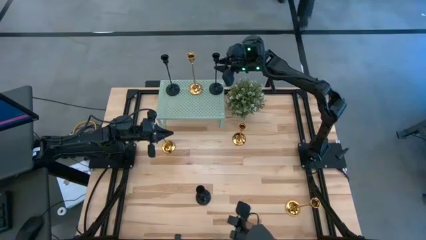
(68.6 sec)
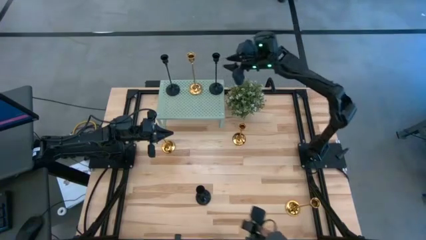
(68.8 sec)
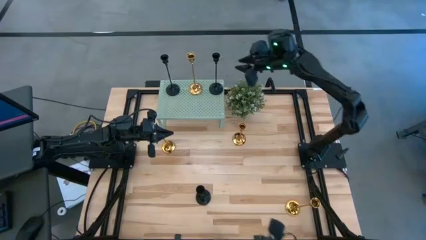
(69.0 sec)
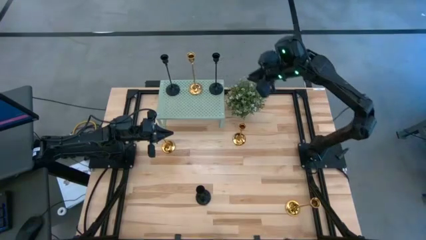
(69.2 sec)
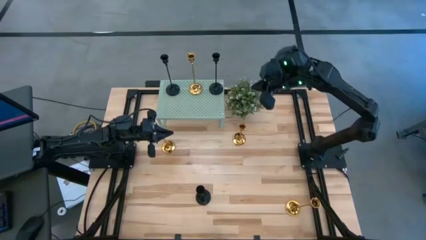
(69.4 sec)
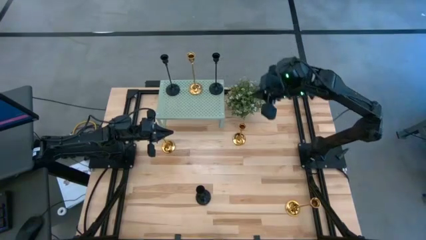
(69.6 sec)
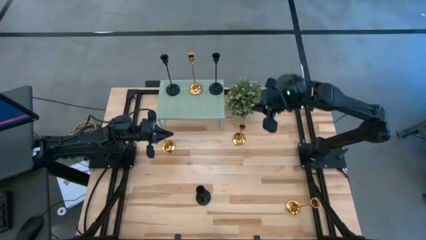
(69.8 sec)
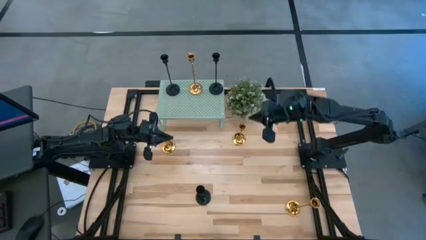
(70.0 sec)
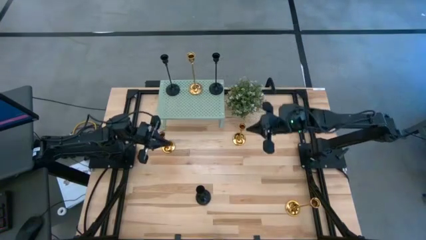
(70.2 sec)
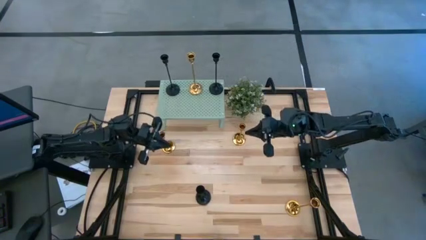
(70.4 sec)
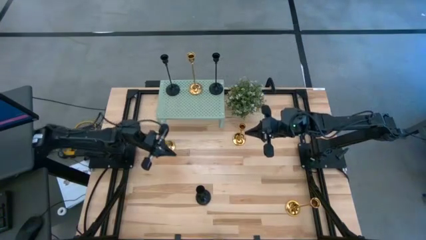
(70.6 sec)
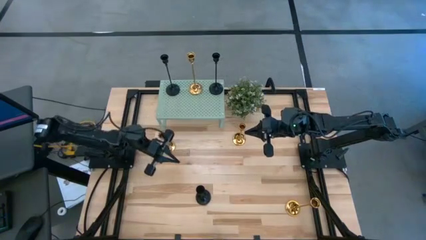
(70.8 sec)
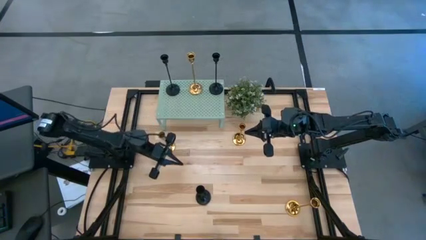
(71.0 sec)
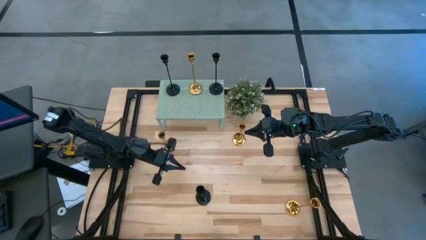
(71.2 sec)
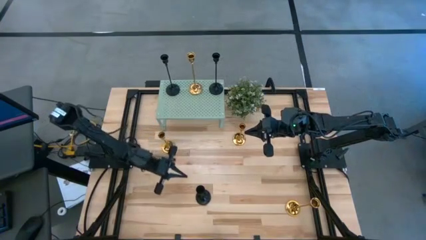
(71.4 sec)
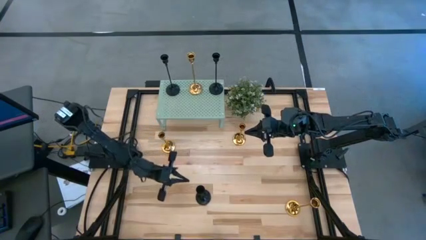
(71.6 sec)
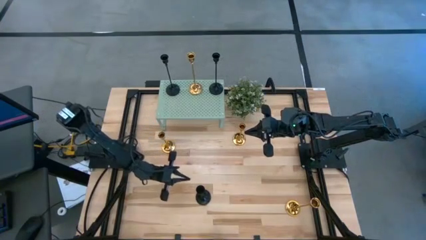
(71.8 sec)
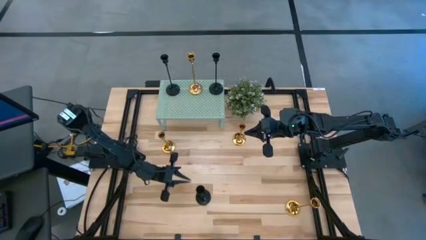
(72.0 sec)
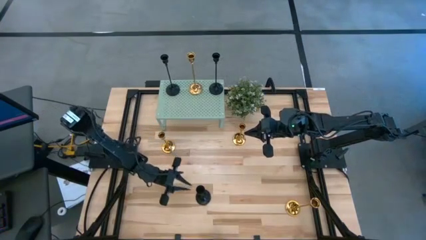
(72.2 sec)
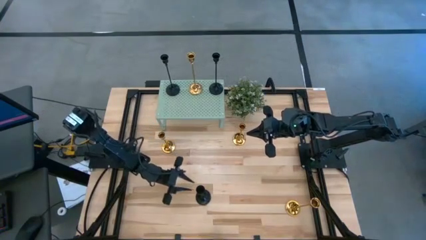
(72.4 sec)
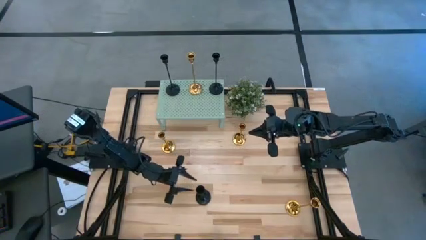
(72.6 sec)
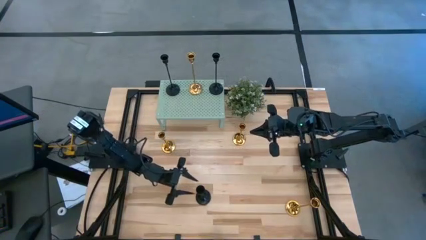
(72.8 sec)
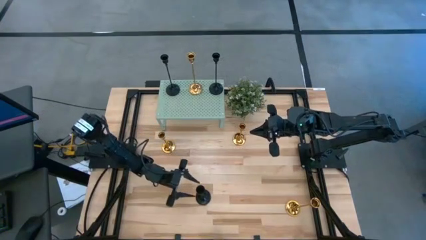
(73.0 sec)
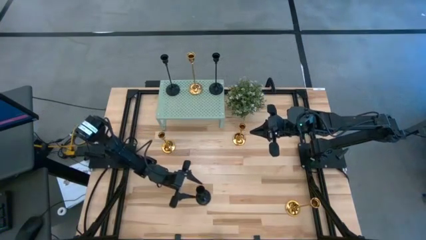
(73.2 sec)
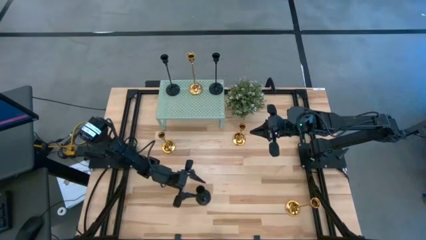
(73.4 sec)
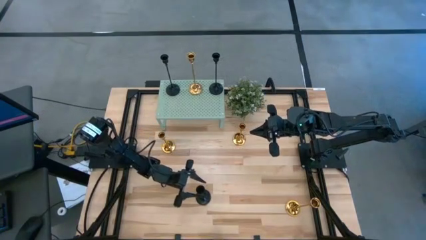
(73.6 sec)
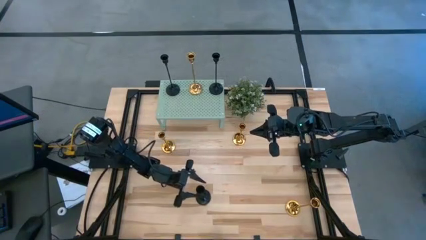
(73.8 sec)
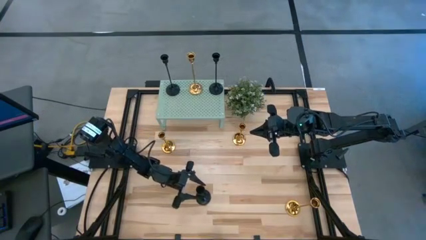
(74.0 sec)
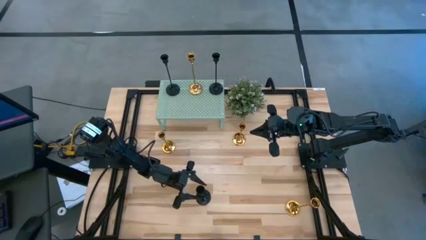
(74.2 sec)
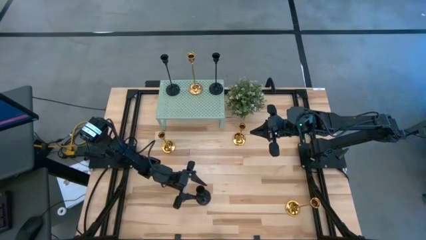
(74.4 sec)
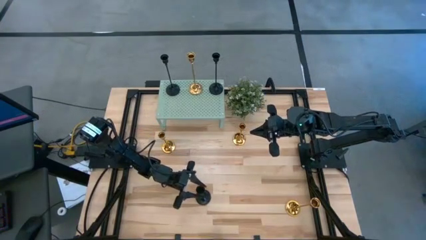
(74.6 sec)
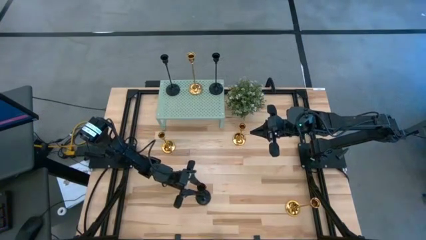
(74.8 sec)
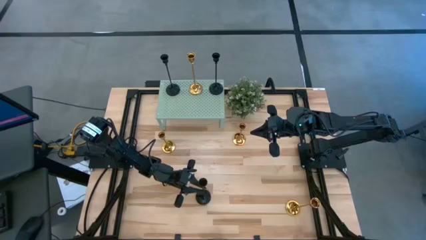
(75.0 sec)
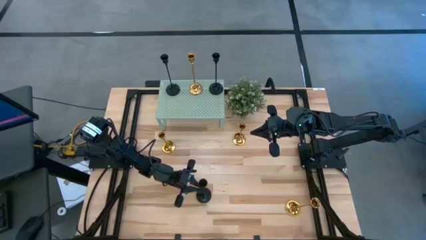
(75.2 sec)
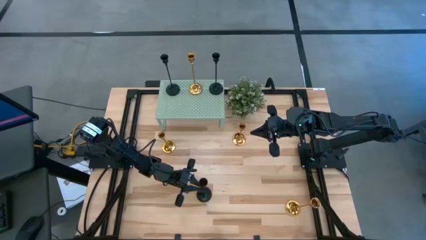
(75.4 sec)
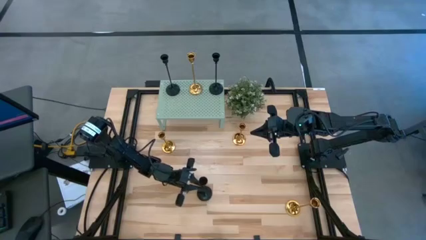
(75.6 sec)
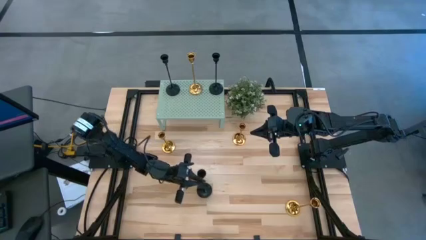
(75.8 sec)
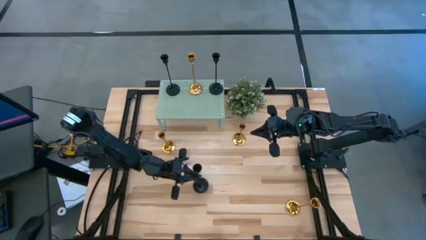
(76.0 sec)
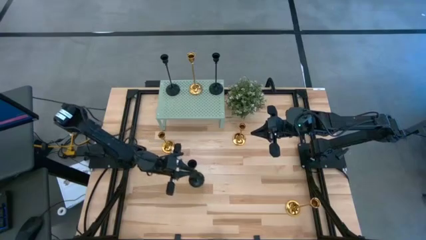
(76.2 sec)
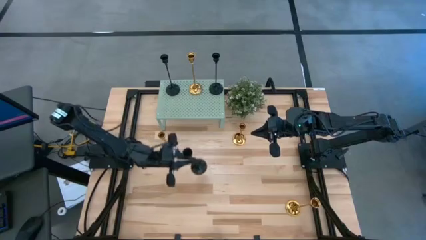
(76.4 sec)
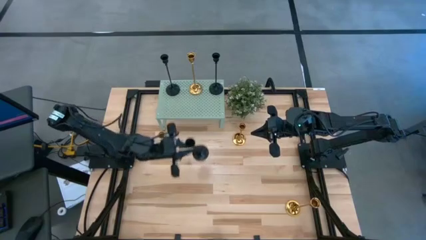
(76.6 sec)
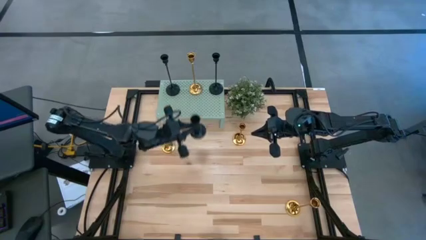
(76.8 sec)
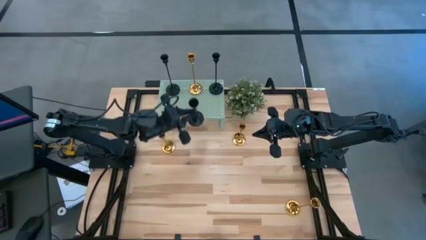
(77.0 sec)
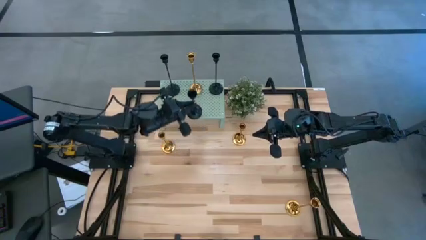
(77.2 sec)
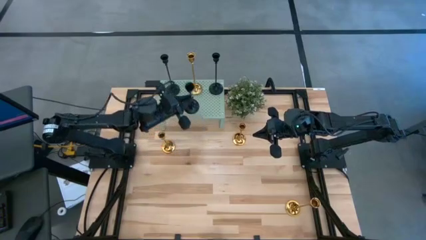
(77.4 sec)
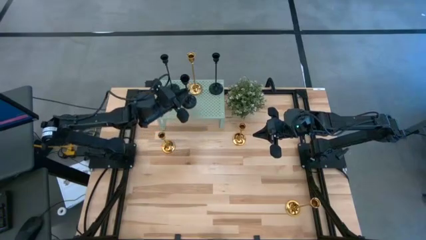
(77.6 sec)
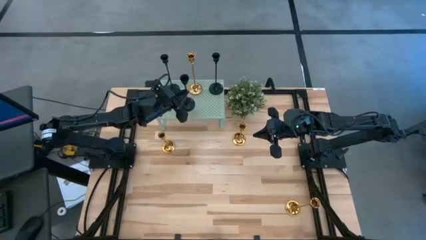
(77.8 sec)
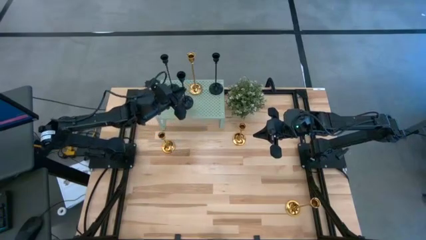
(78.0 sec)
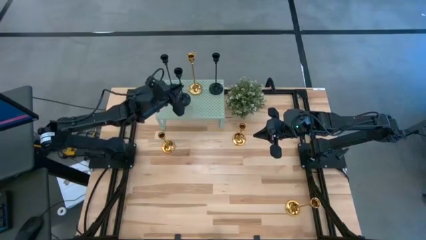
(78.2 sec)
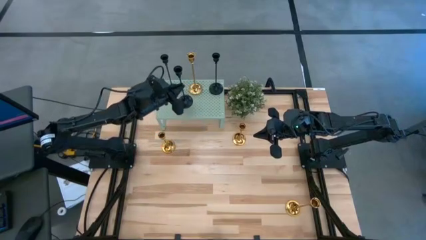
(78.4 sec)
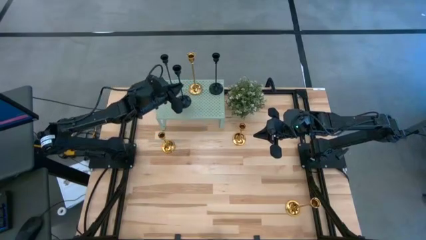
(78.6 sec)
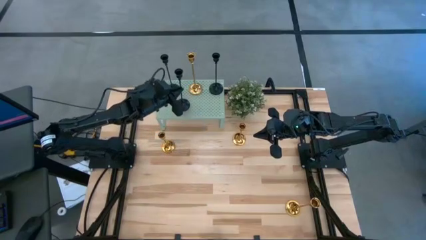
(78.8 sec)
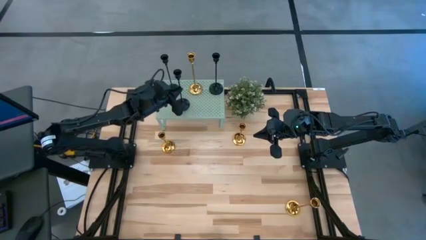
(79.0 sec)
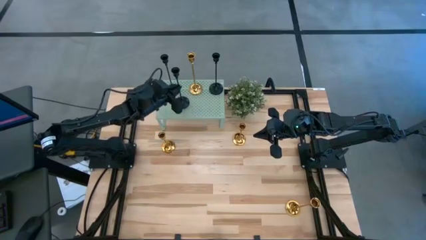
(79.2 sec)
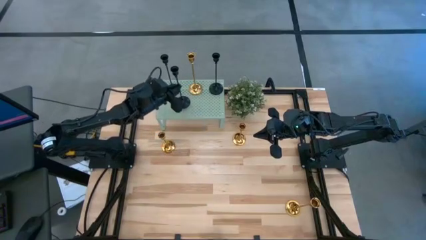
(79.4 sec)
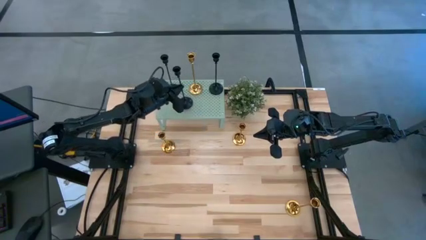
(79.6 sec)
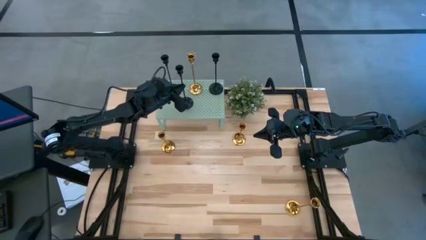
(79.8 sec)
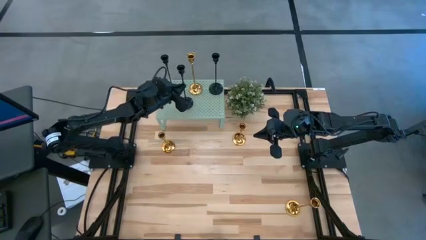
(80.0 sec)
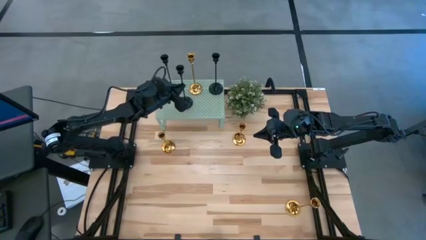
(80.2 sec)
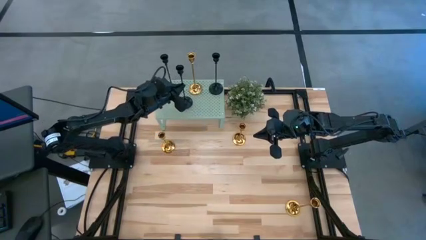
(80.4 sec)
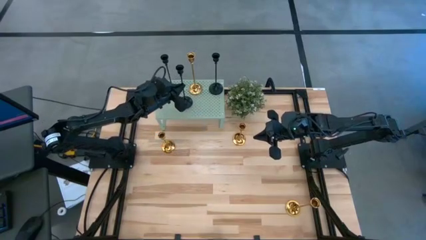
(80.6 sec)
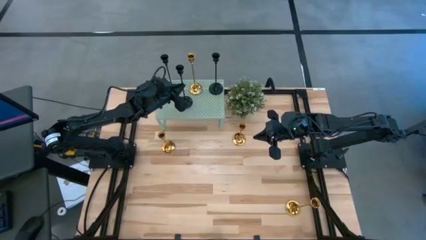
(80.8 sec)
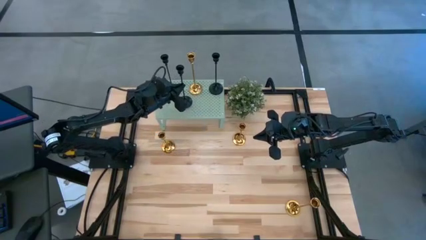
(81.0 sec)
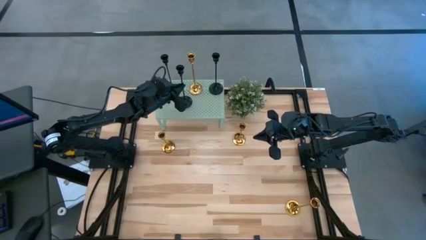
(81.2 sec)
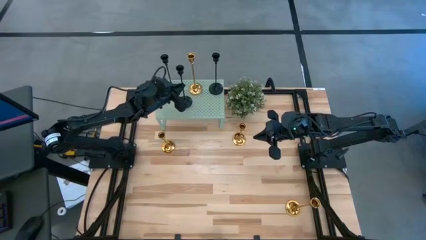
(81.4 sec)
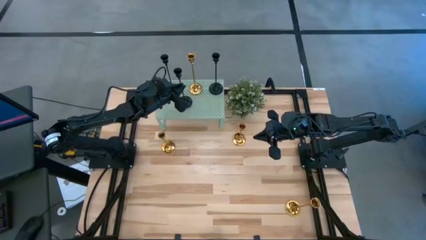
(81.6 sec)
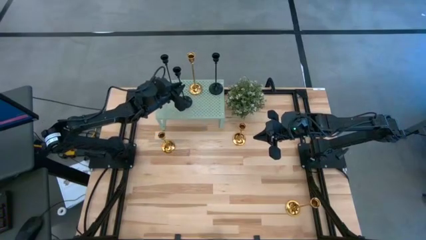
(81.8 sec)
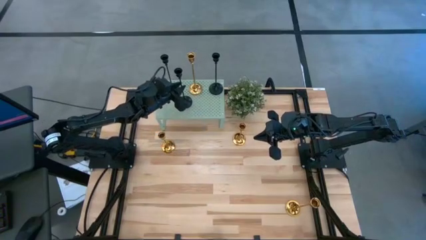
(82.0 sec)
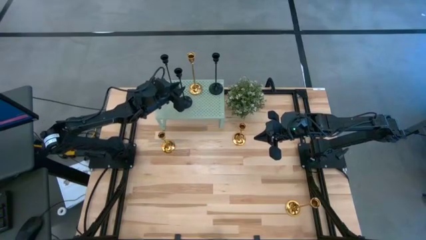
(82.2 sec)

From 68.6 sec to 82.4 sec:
Task: Pick & Place candle stick holders
Put the black candle holder on the shelf

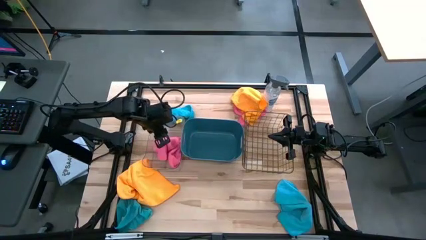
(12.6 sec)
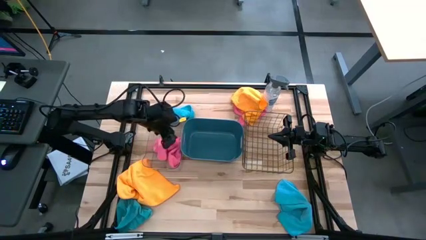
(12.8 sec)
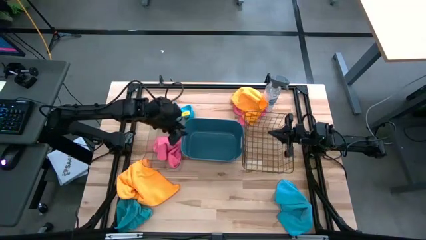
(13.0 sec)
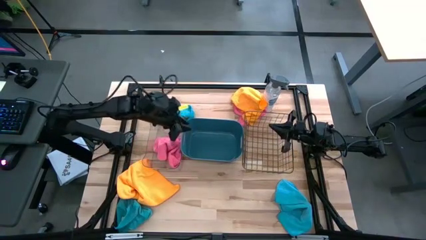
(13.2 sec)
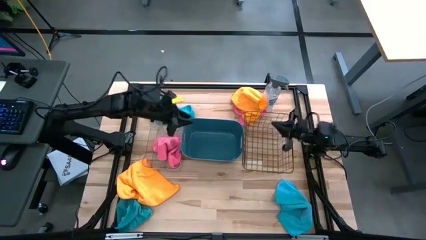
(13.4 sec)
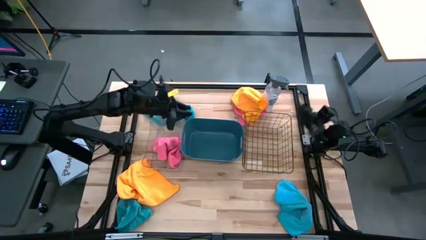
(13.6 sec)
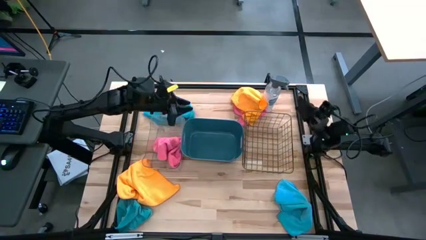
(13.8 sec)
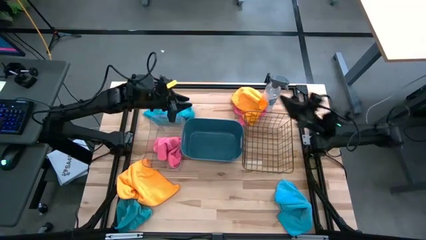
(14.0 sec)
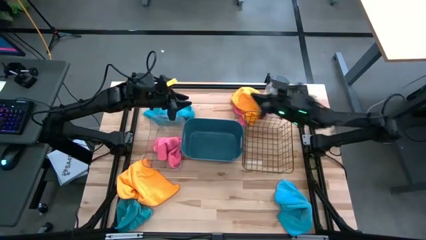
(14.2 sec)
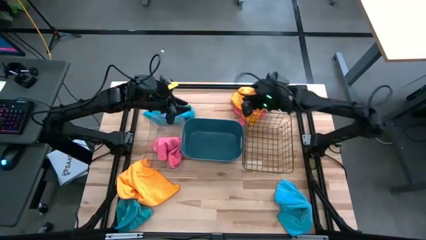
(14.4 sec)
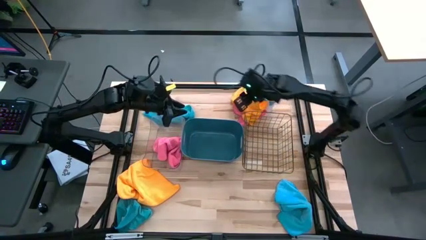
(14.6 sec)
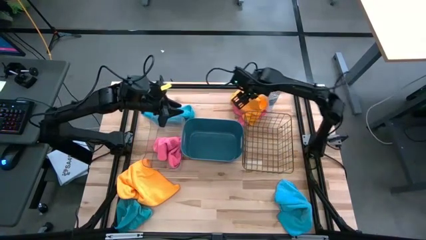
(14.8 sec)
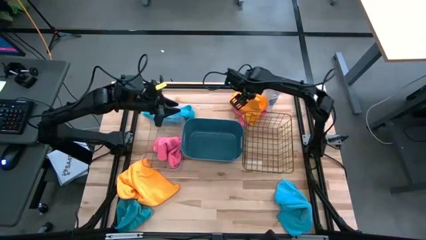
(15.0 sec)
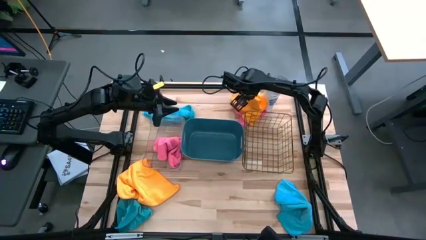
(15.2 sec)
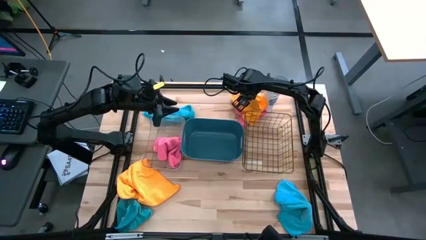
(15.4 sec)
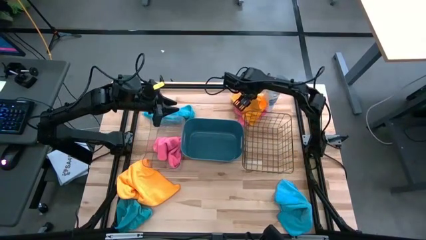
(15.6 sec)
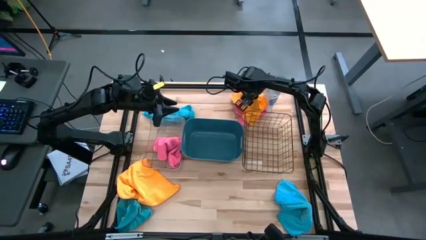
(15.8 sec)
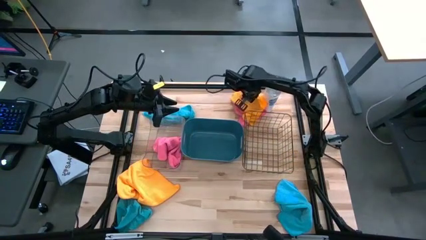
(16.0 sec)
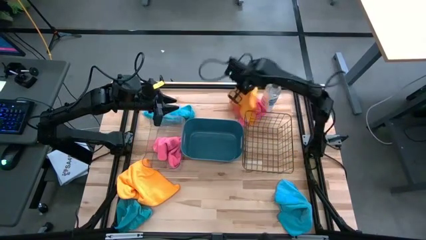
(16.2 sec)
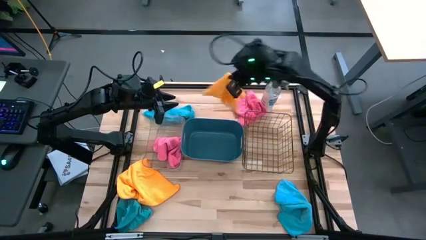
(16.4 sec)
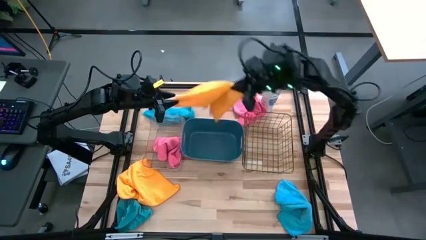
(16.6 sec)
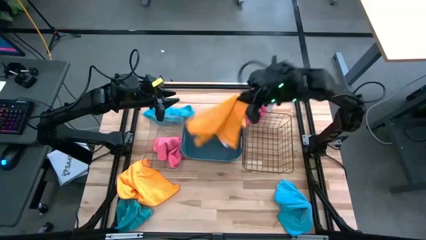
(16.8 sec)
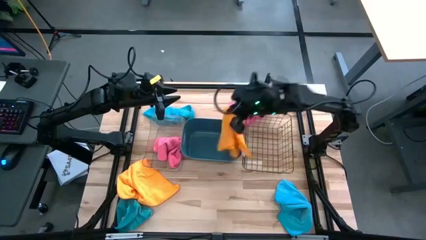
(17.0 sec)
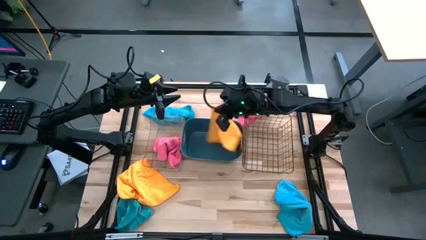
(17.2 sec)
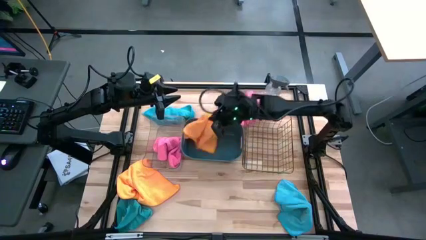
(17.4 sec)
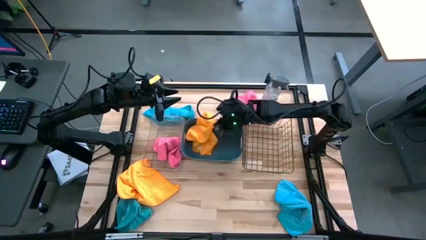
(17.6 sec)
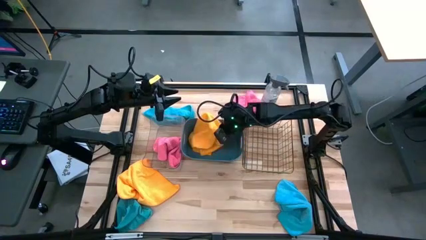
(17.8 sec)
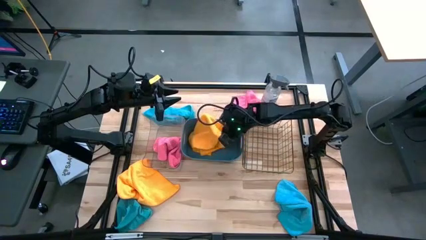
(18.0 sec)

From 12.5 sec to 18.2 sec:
Task: Sort microfiber towel by color & place in baskets
Put the top yellow microfiber cloth into the blue bin
